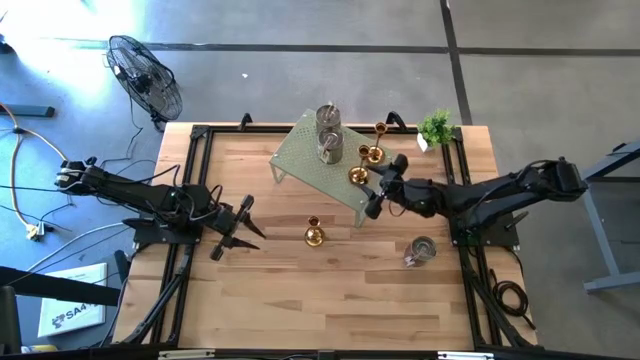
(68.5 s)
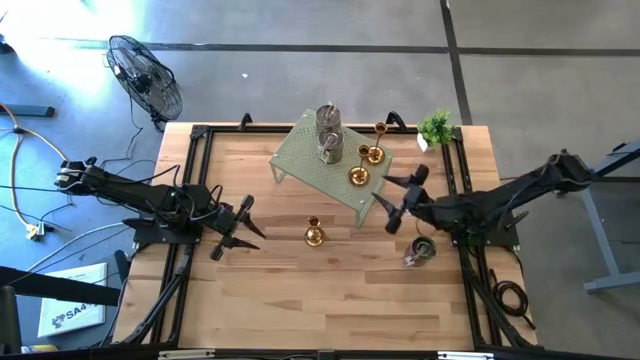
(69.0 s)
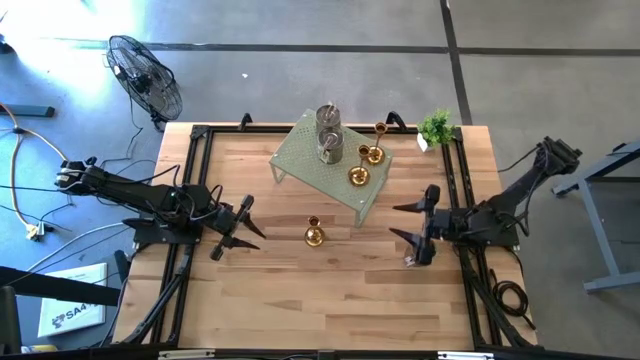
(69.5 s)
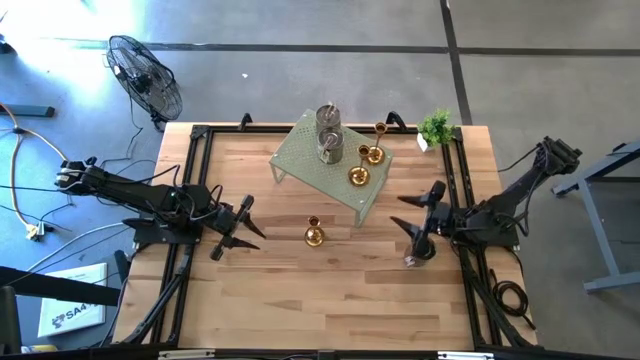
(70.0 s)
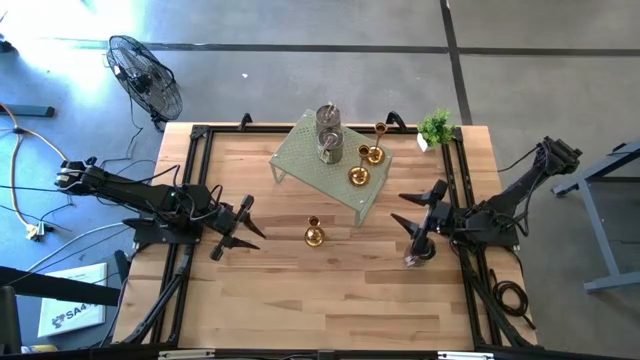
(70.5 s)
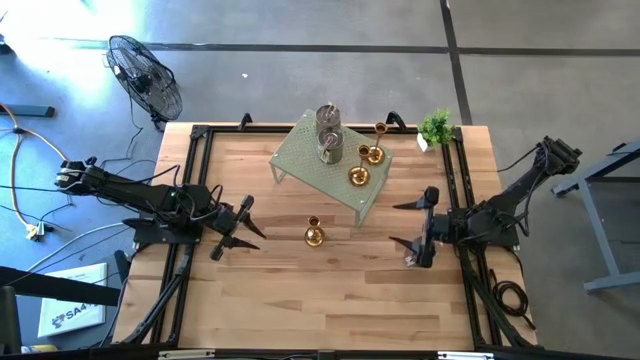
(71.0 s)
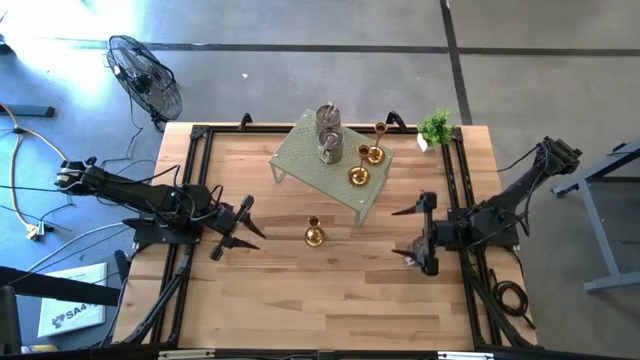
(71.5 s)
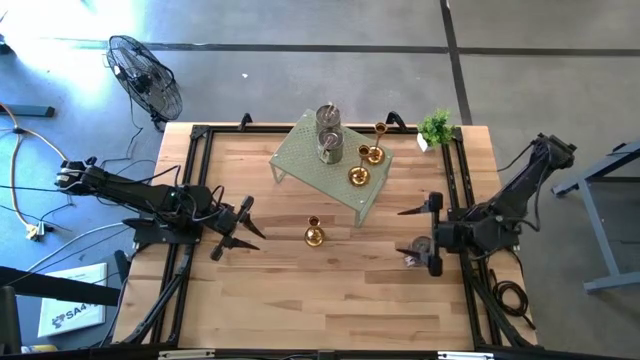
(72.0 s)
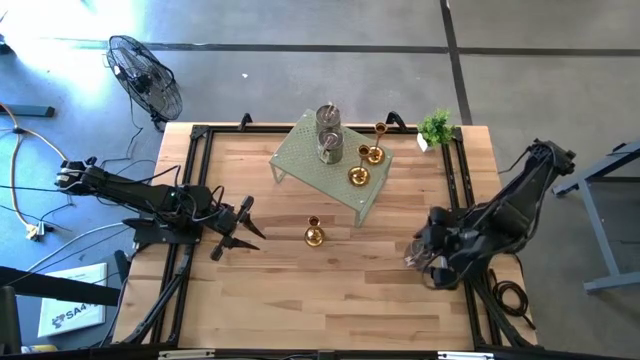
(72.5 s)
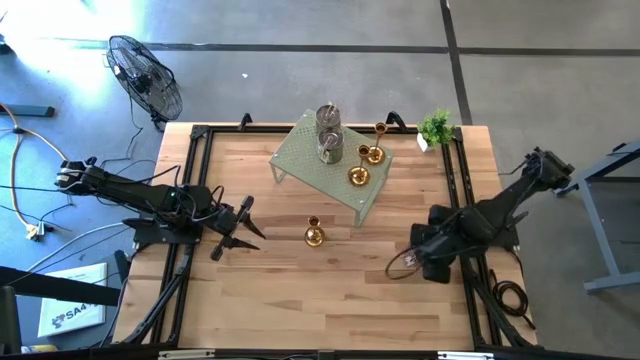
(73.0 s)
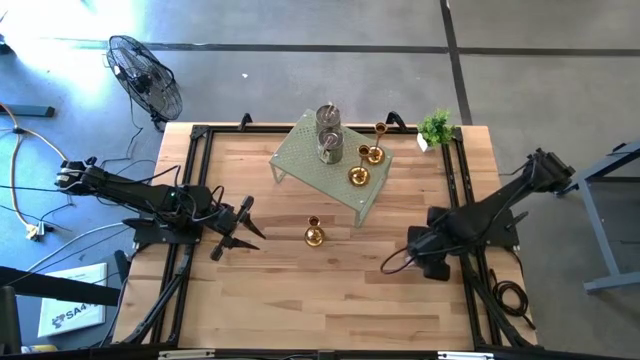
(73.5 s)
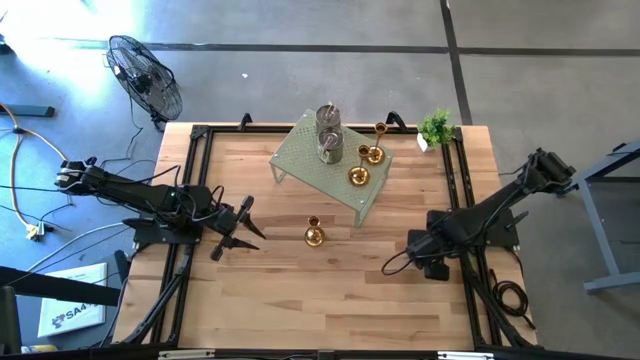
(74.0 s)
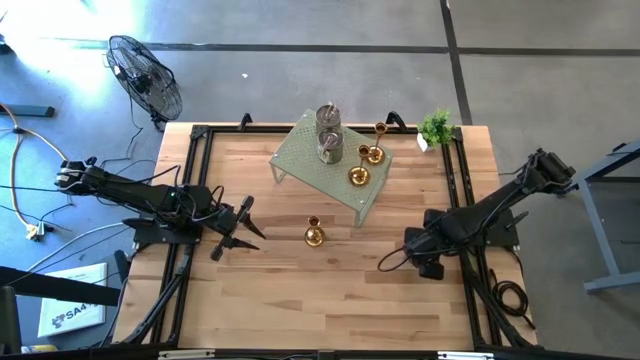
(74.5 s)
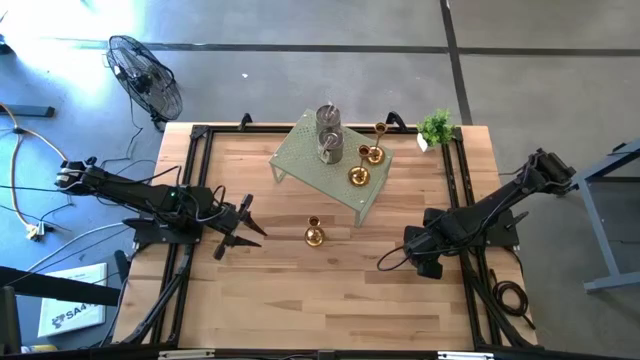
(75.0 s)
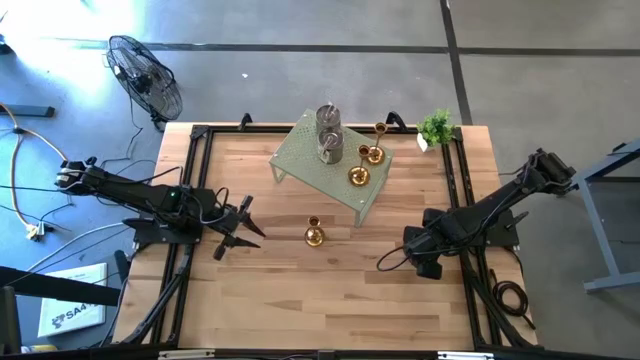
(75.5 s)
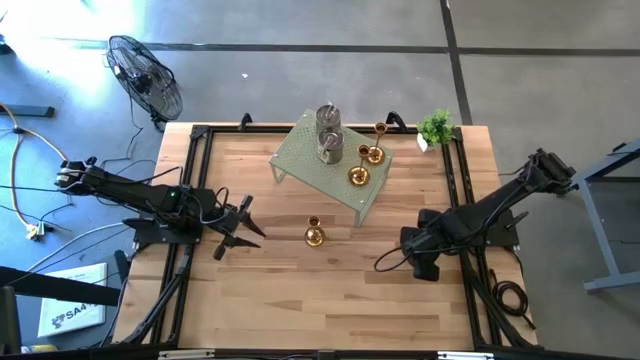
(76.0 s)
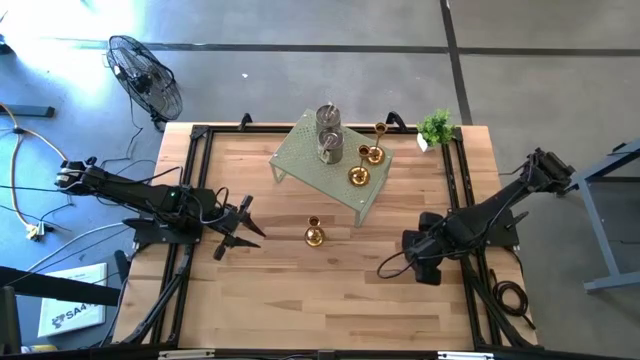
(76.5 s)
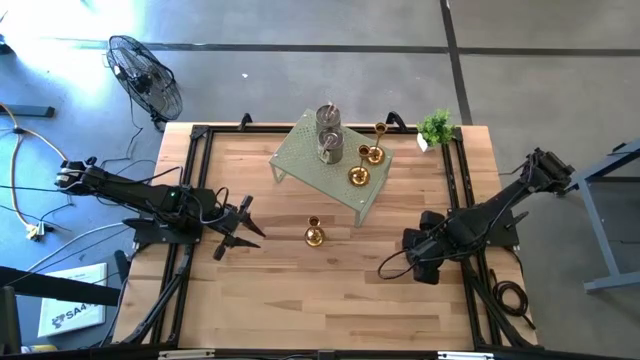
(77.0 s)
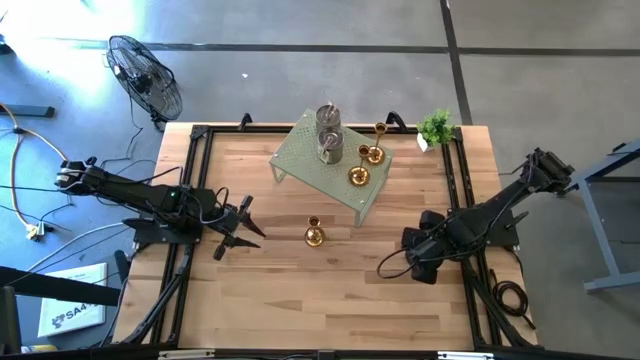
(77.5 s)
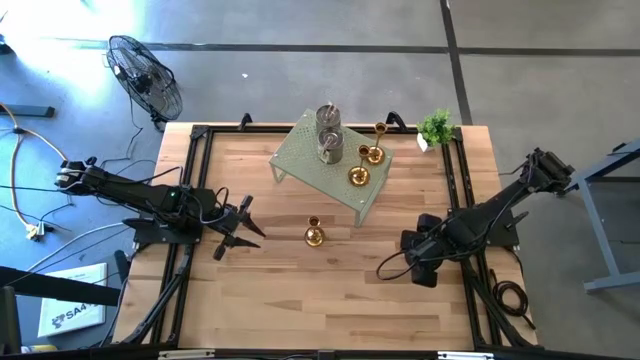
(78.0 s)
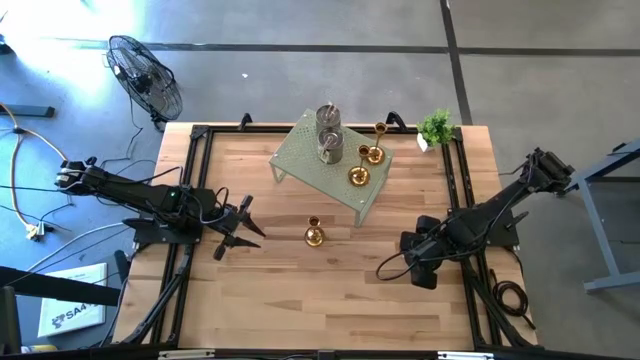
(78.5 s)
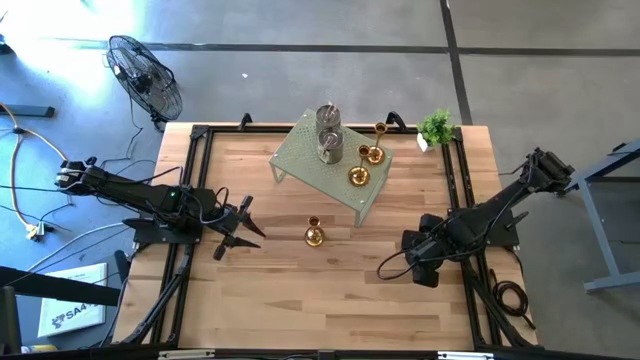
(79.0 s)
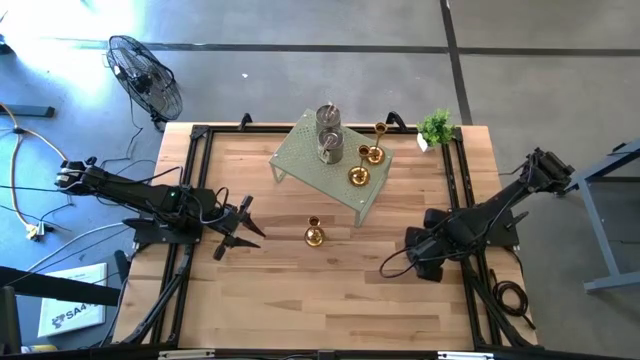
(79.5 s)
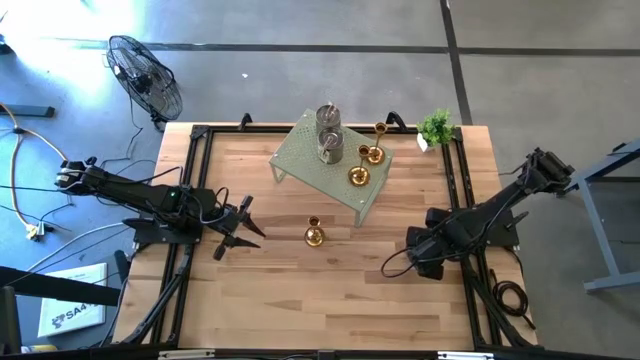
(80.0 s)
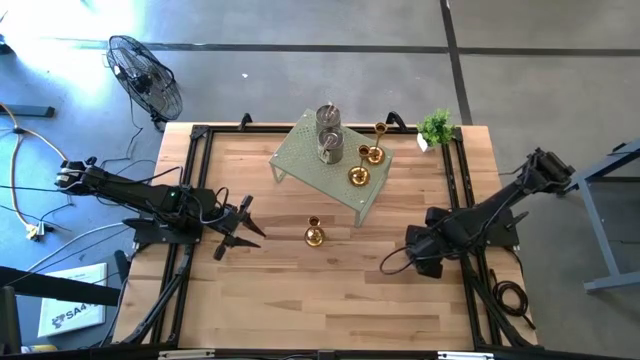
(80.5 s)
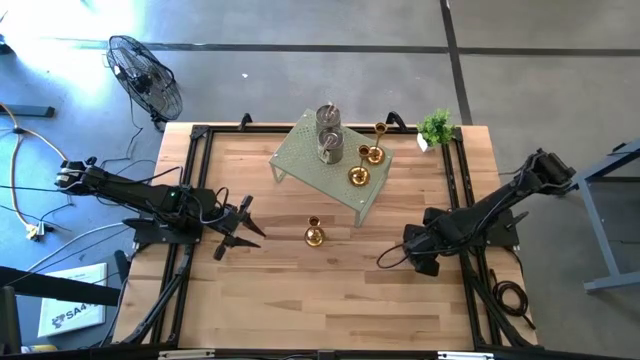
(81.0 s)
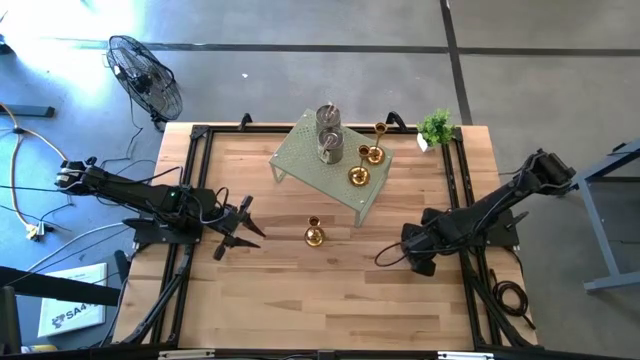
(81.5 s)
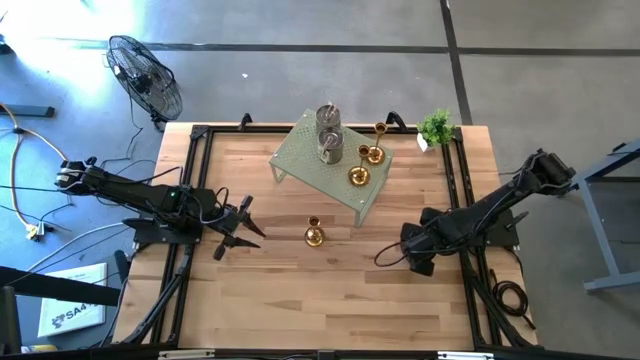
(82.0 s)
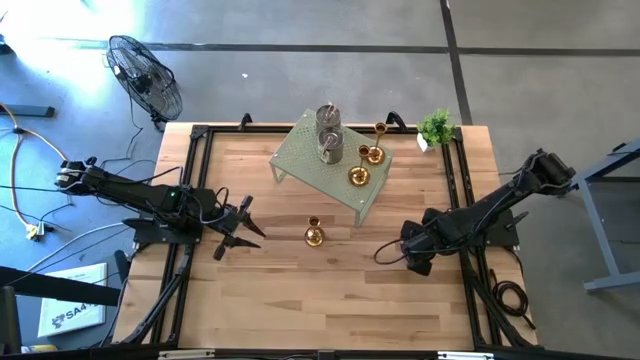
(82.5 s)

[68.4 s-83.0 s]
Task: Pick & Place candle stick holders
Put the brown scented candle on the shelf

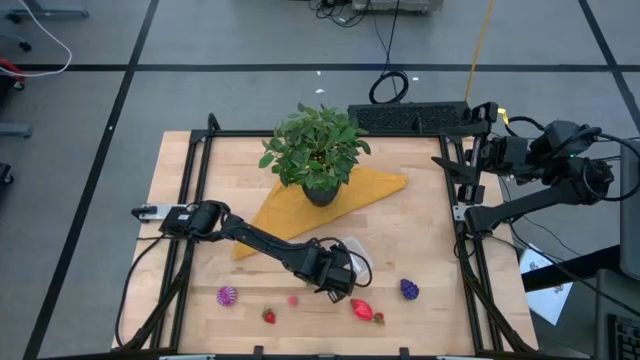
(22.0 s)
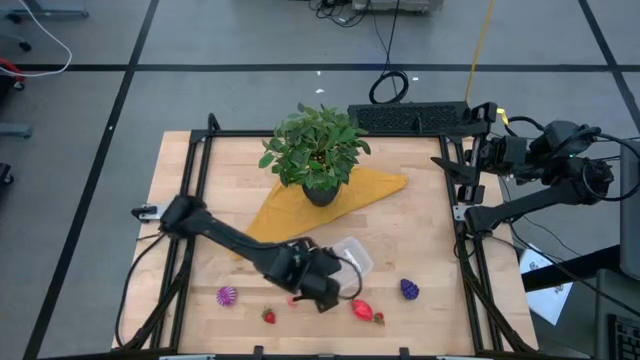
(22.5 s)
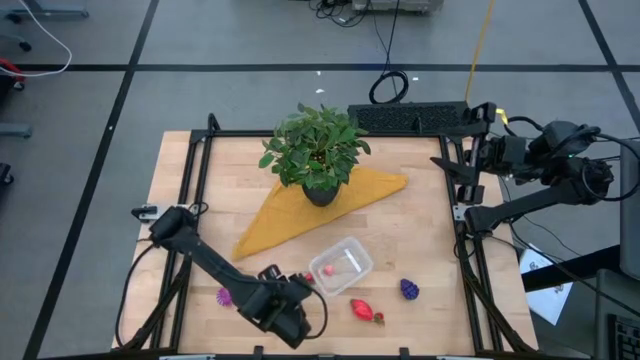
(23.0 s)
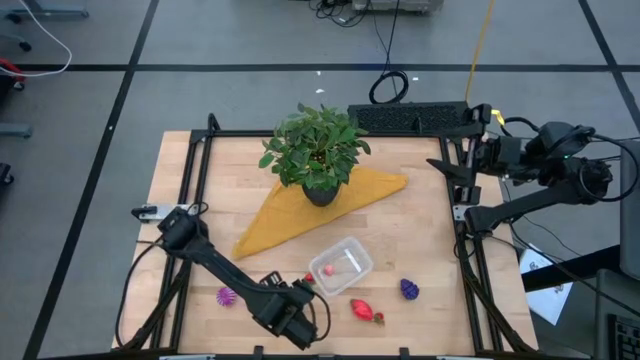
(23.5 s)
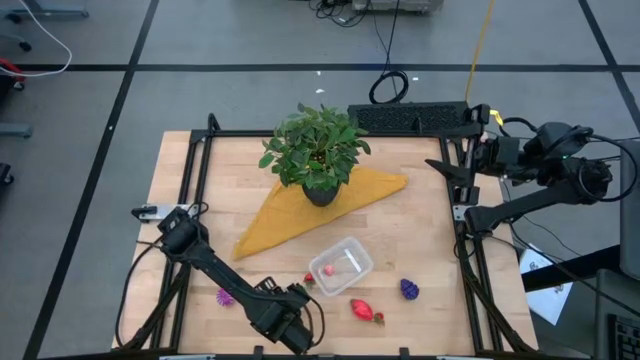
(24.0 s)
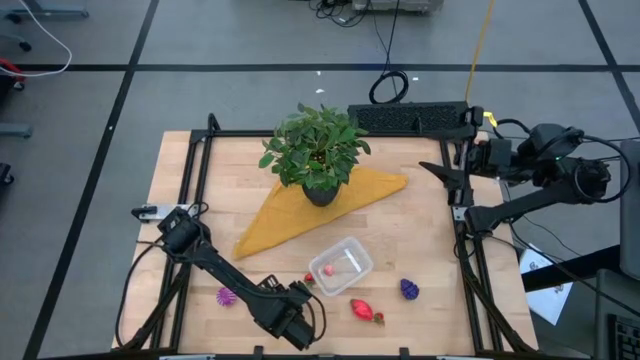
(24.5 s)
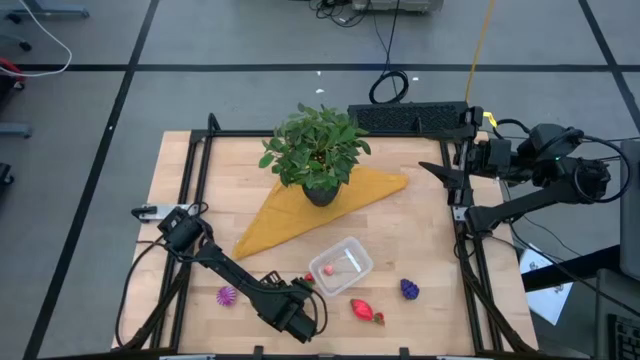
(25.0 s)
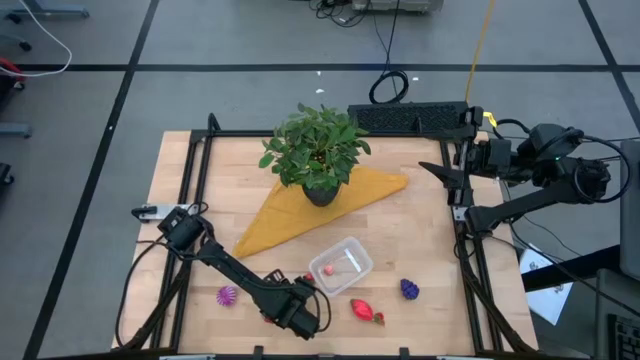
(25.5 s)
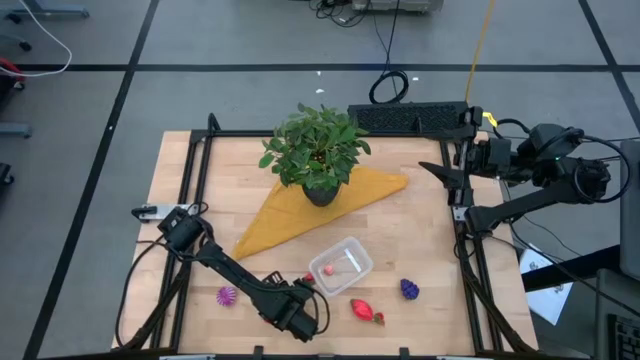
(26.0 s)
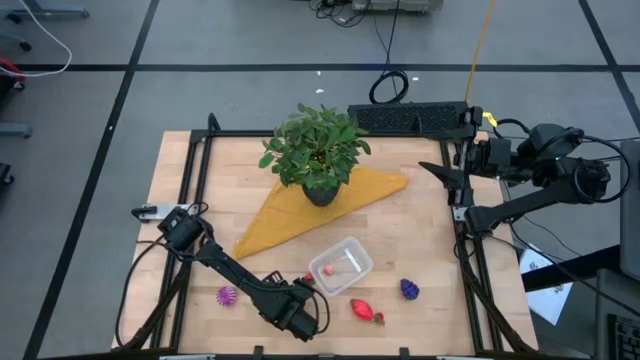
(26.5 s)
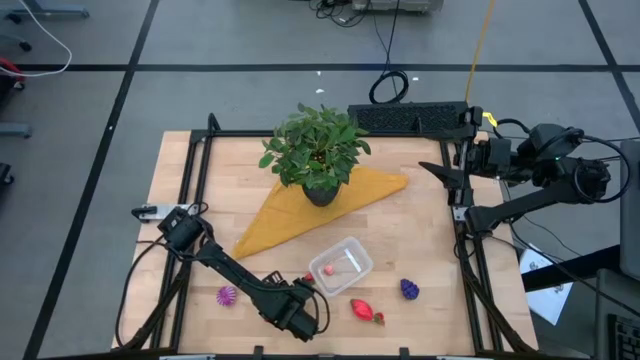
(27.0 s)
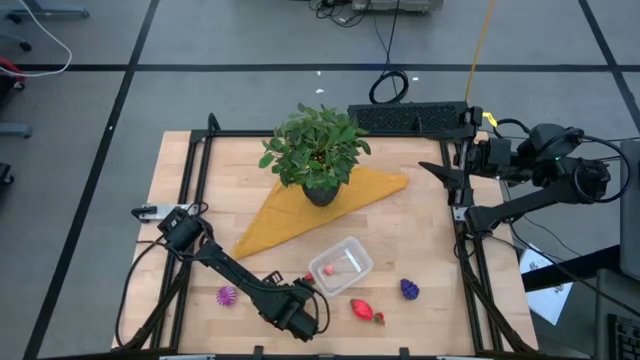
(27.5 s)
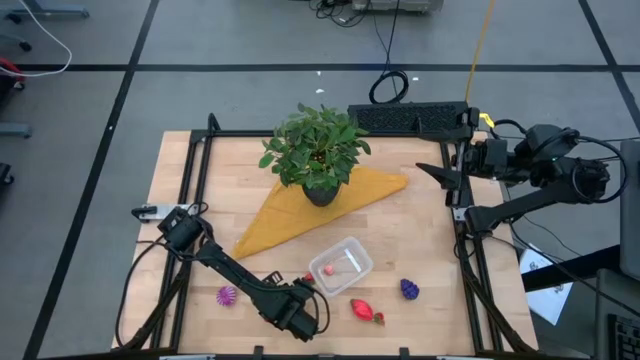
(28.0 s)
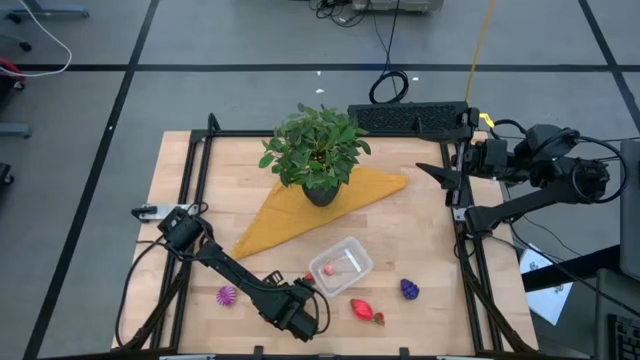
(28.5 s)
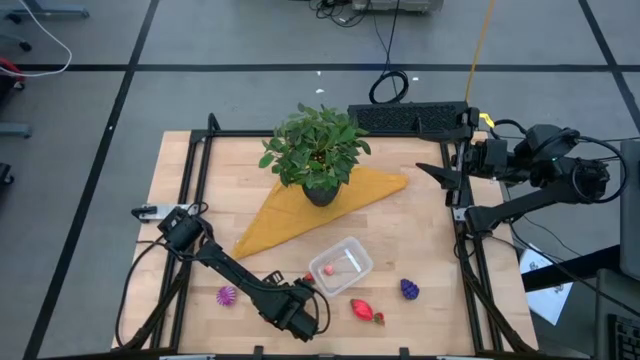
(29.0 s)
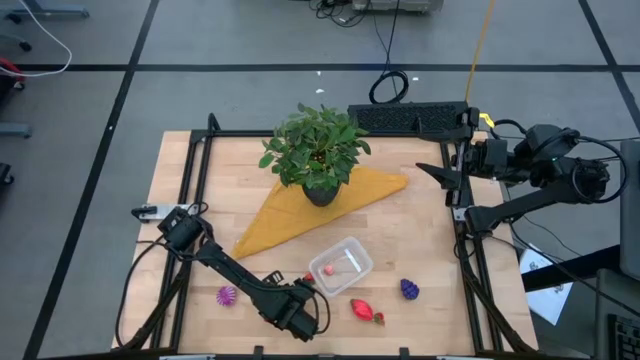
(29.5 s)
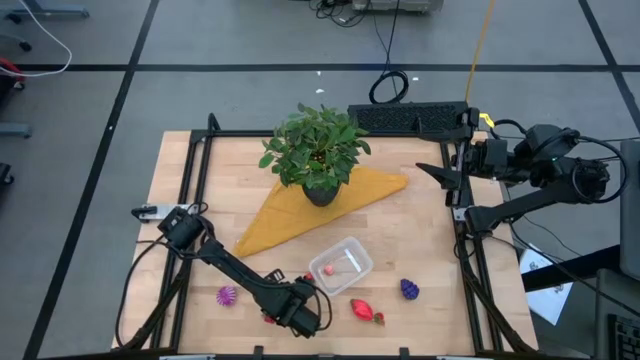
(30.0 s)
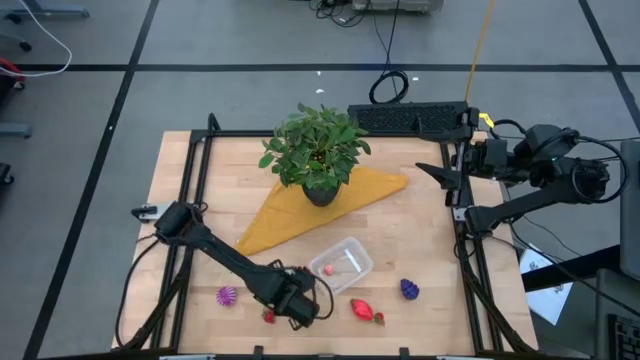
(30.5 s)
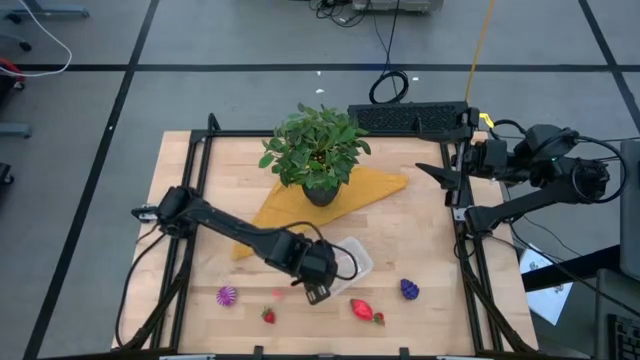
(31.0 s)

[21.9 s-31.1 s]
Task: Pick and placing Produce into tupperware
Put the lychee into the transparent bin
